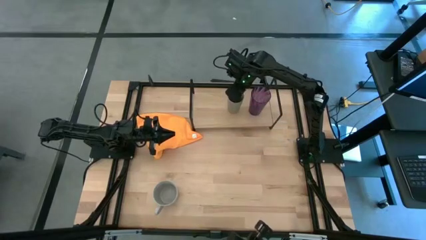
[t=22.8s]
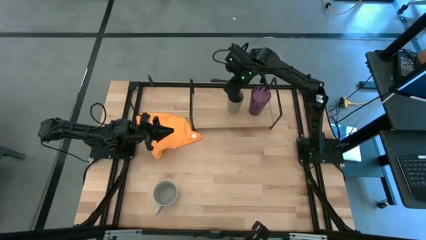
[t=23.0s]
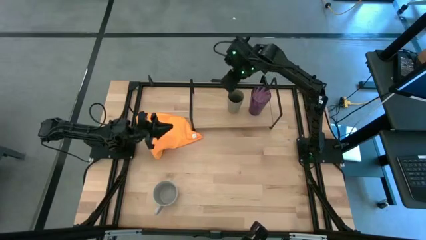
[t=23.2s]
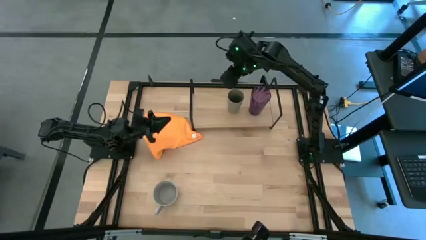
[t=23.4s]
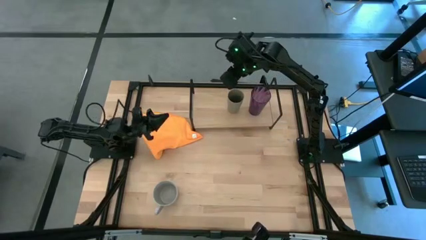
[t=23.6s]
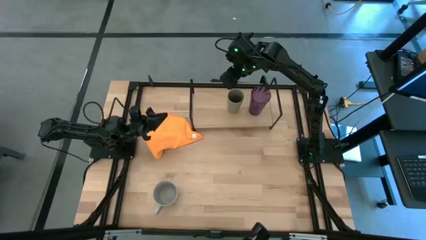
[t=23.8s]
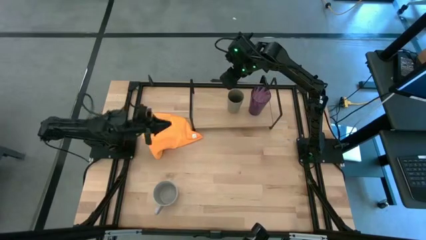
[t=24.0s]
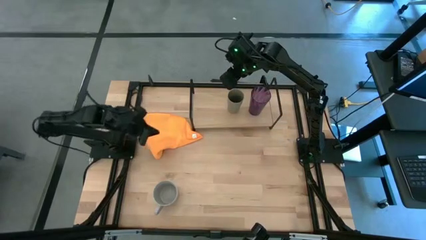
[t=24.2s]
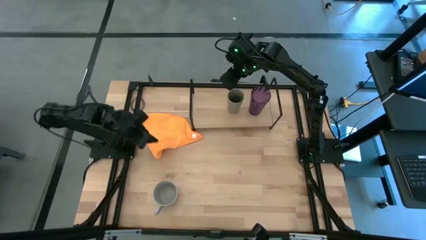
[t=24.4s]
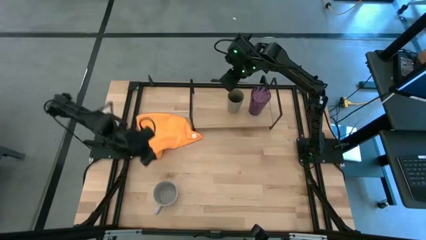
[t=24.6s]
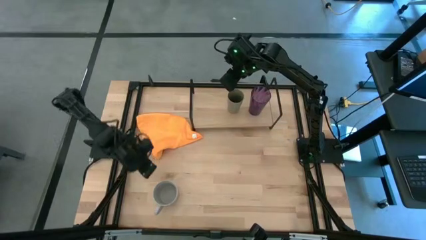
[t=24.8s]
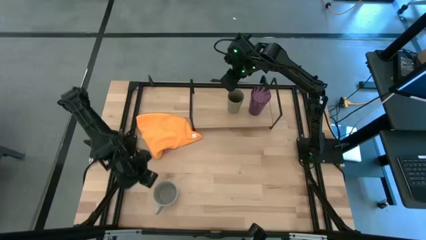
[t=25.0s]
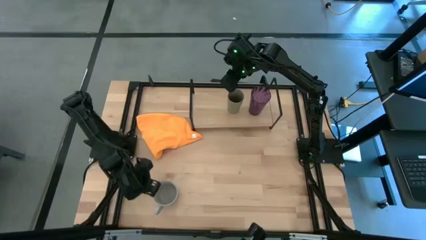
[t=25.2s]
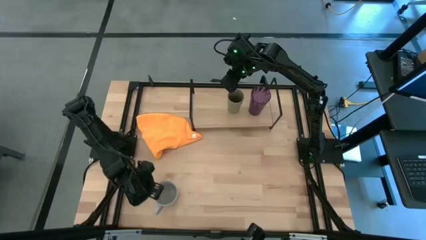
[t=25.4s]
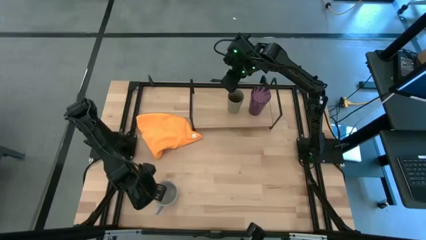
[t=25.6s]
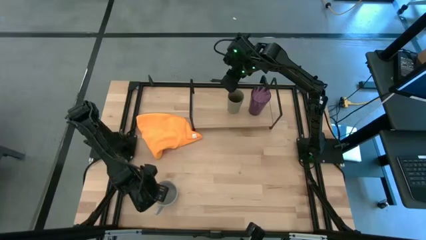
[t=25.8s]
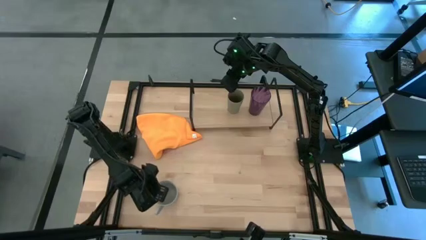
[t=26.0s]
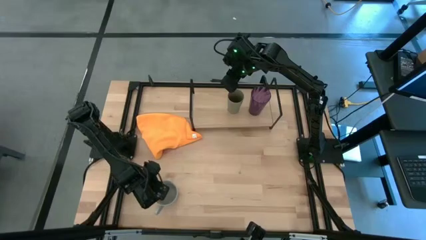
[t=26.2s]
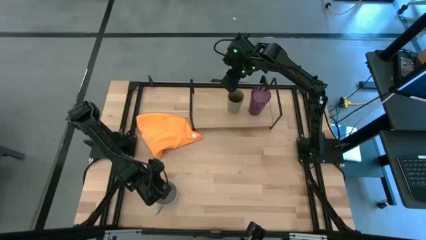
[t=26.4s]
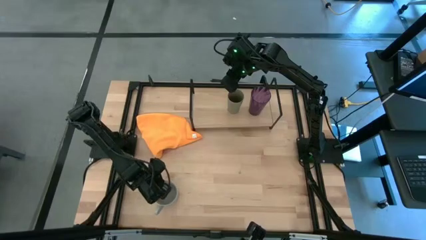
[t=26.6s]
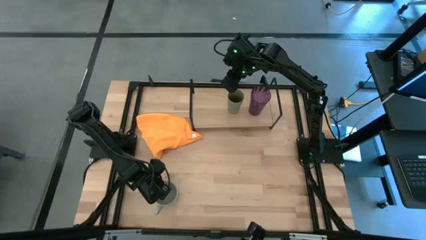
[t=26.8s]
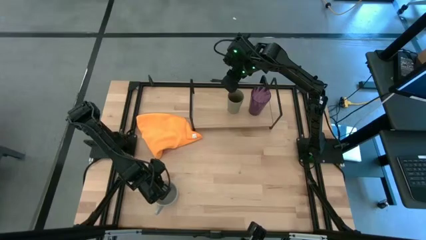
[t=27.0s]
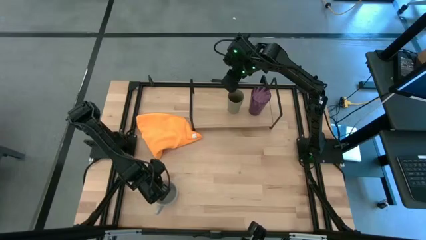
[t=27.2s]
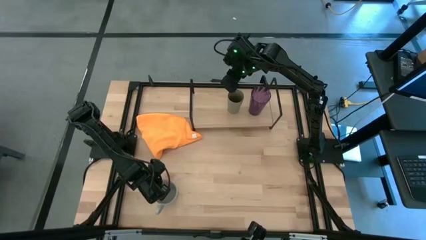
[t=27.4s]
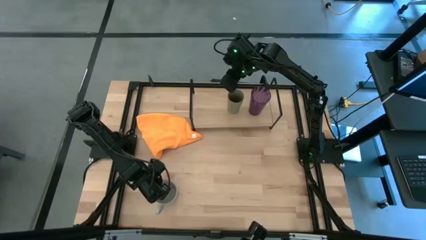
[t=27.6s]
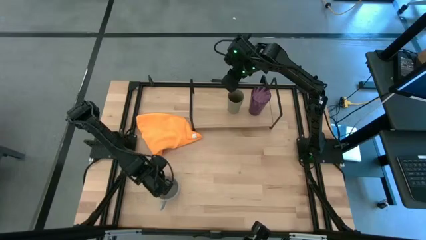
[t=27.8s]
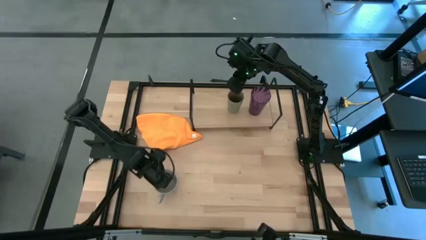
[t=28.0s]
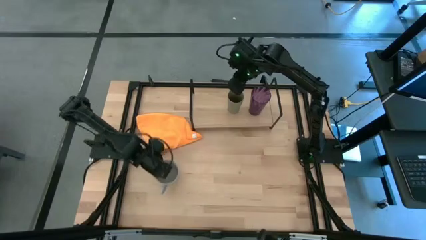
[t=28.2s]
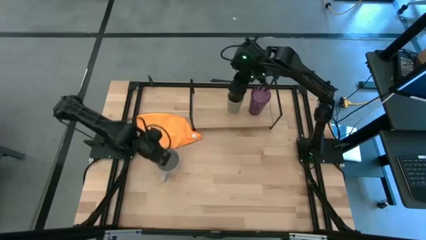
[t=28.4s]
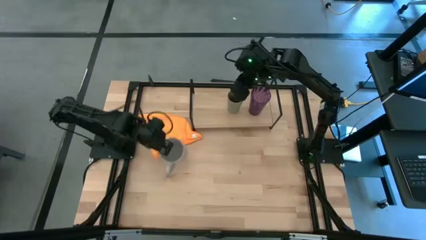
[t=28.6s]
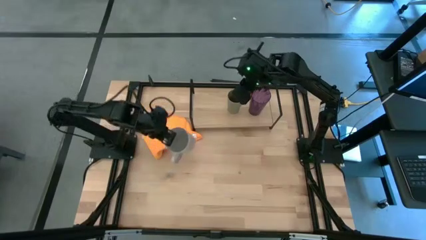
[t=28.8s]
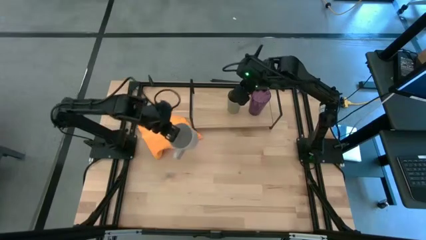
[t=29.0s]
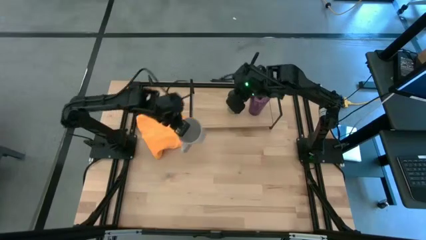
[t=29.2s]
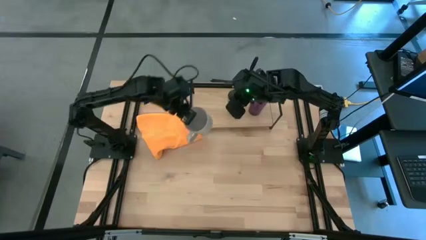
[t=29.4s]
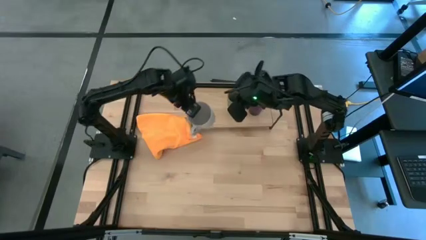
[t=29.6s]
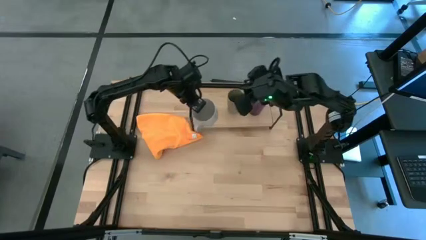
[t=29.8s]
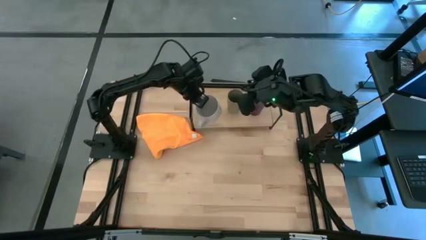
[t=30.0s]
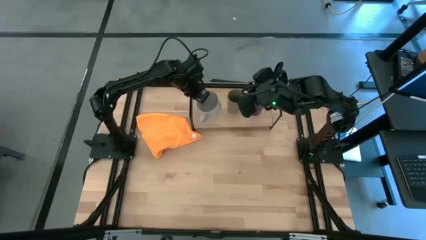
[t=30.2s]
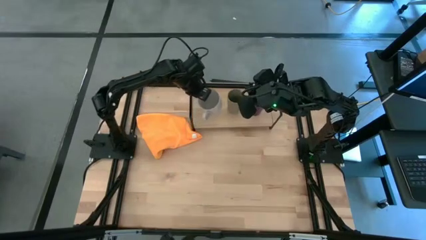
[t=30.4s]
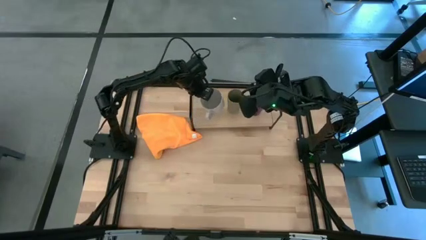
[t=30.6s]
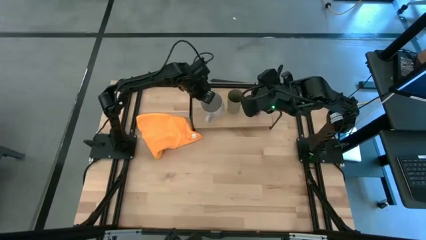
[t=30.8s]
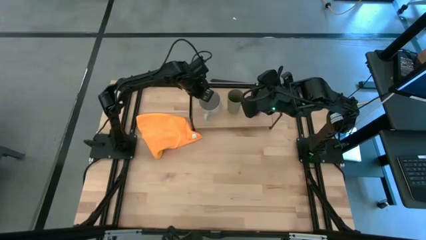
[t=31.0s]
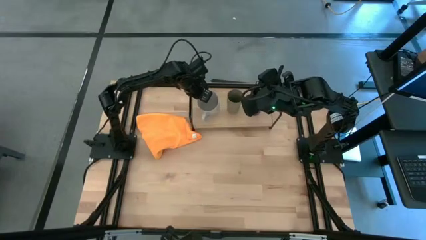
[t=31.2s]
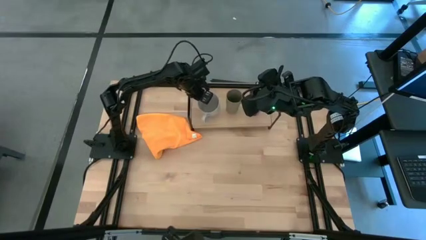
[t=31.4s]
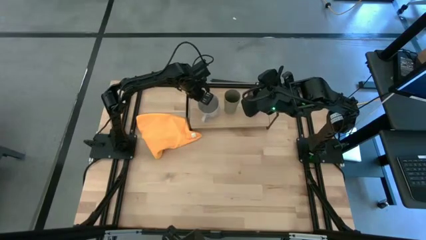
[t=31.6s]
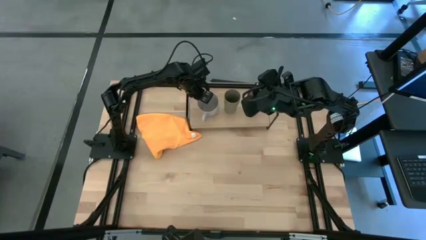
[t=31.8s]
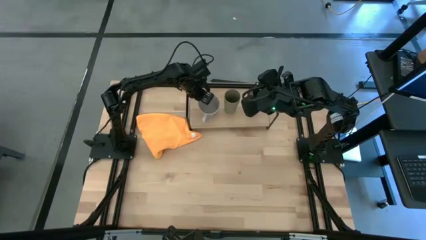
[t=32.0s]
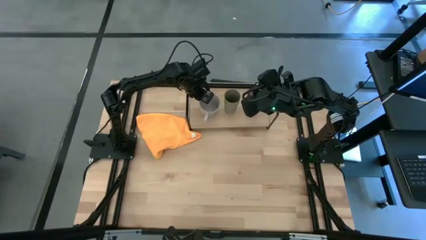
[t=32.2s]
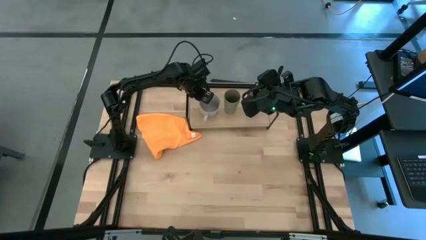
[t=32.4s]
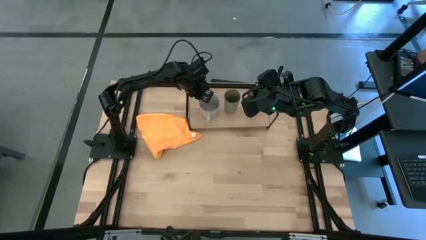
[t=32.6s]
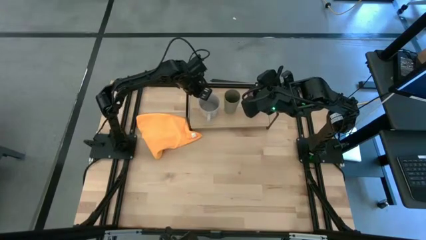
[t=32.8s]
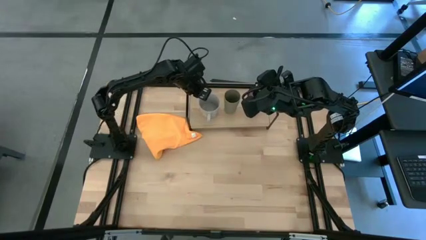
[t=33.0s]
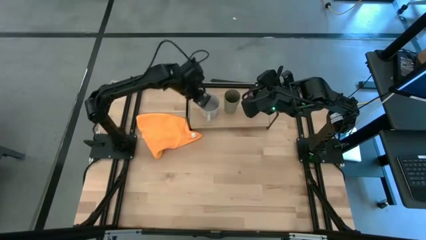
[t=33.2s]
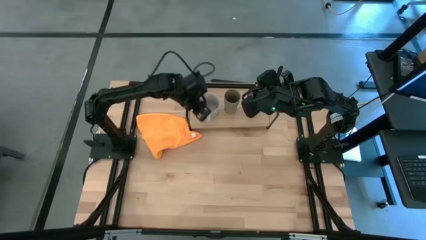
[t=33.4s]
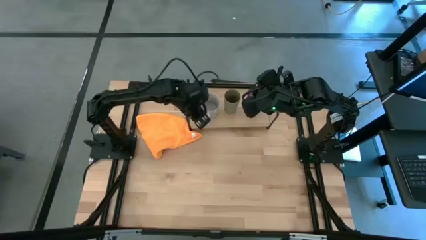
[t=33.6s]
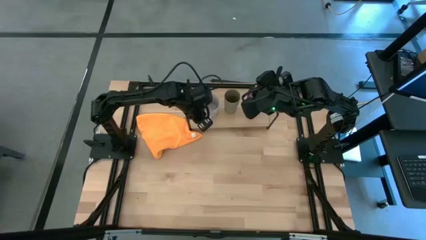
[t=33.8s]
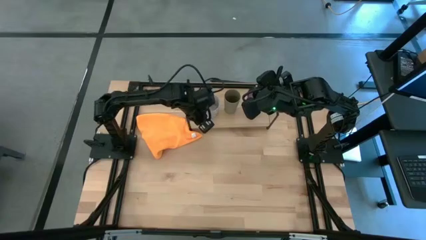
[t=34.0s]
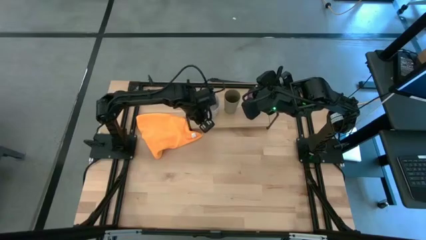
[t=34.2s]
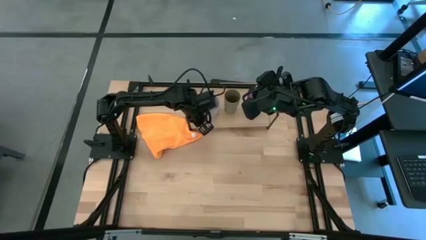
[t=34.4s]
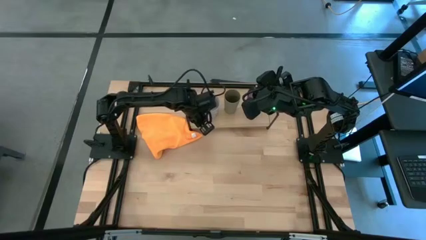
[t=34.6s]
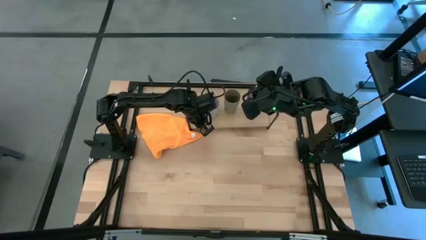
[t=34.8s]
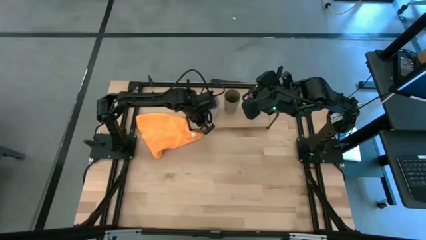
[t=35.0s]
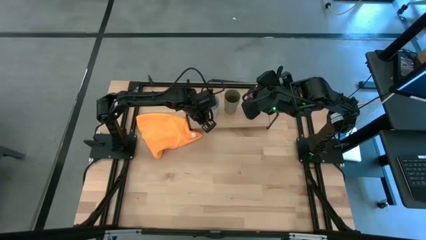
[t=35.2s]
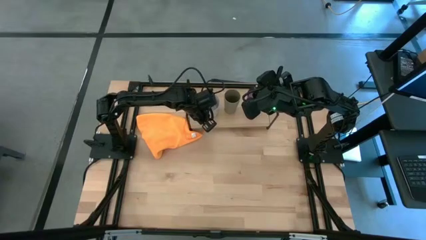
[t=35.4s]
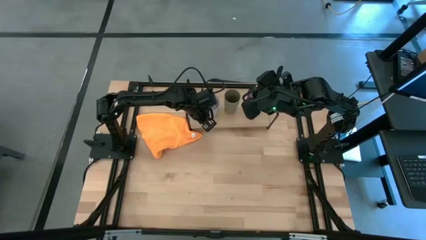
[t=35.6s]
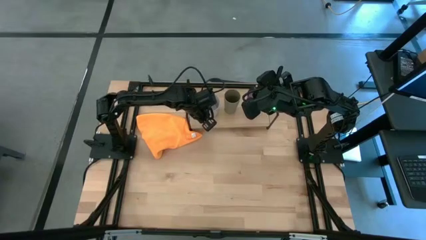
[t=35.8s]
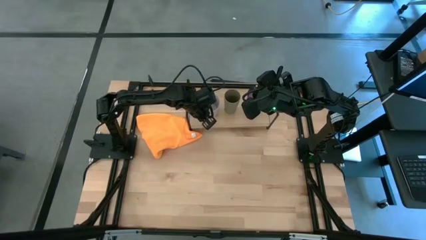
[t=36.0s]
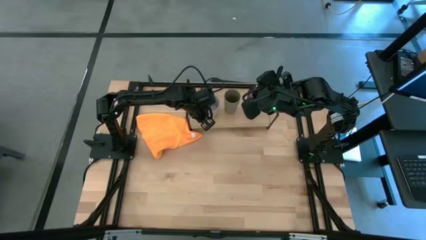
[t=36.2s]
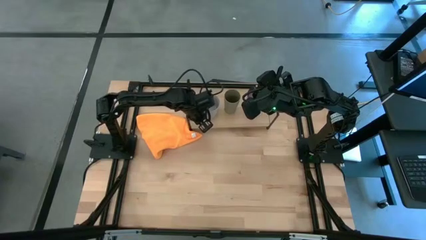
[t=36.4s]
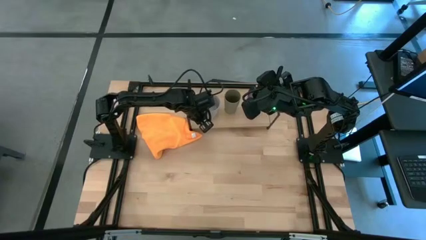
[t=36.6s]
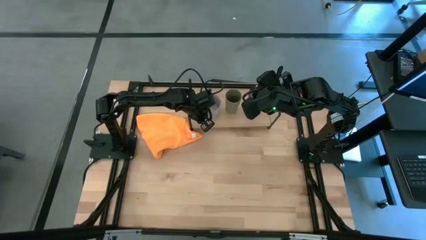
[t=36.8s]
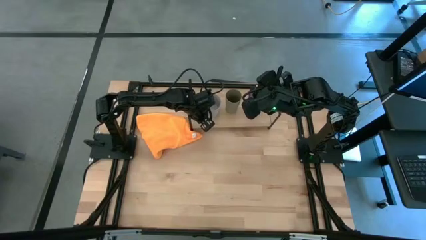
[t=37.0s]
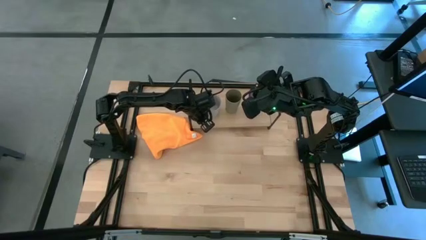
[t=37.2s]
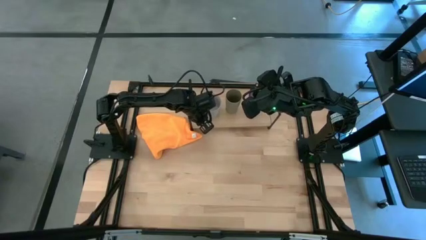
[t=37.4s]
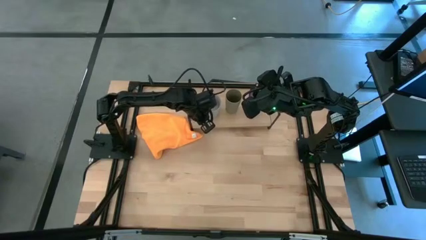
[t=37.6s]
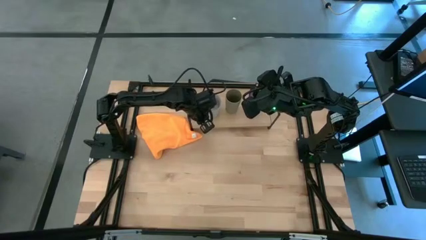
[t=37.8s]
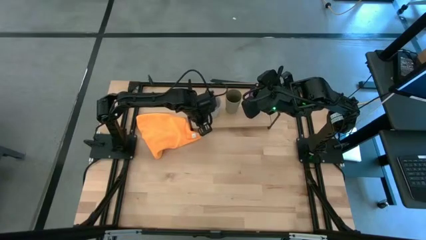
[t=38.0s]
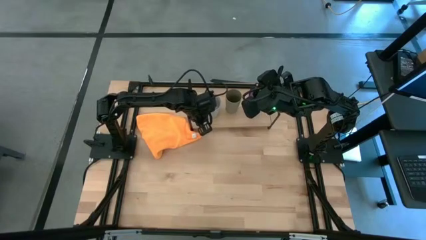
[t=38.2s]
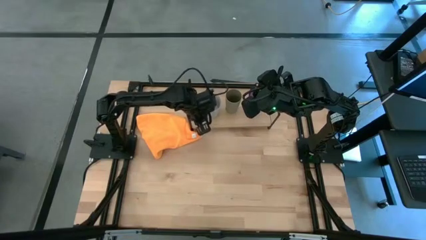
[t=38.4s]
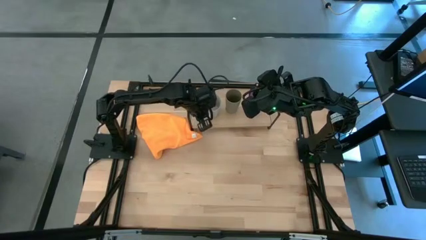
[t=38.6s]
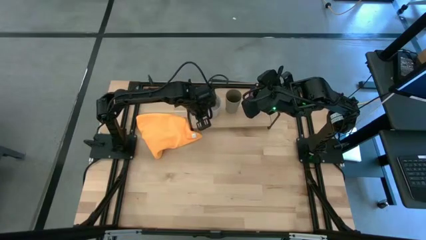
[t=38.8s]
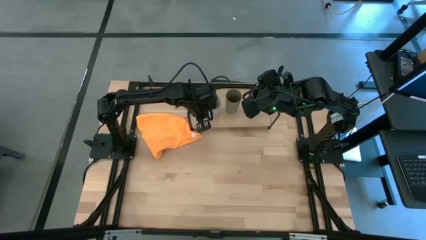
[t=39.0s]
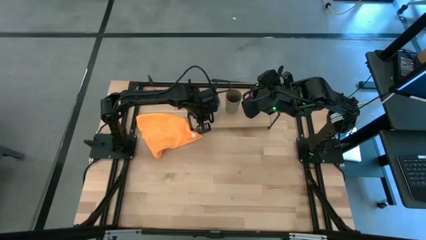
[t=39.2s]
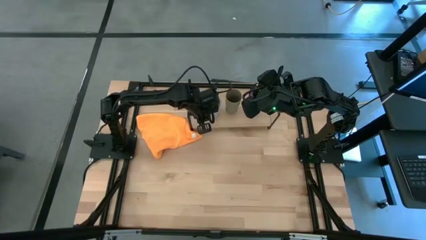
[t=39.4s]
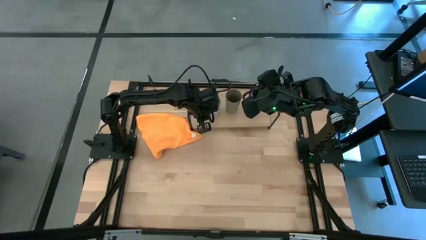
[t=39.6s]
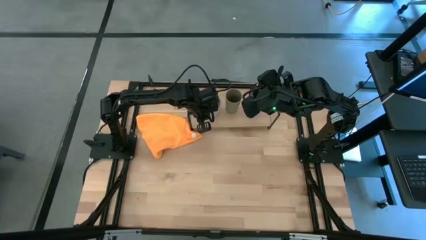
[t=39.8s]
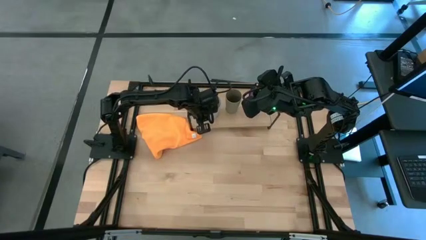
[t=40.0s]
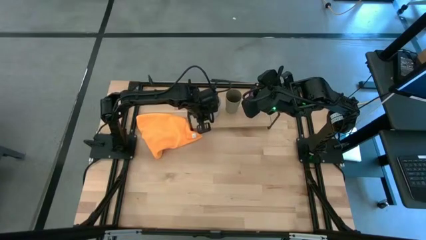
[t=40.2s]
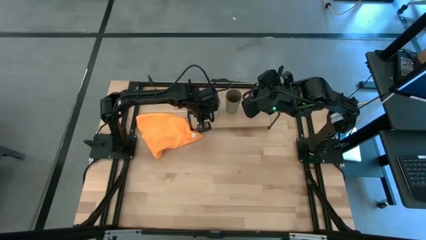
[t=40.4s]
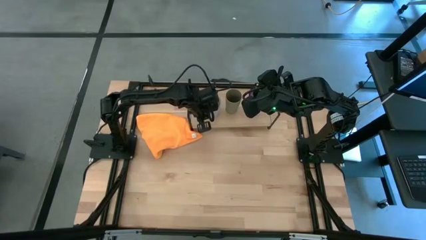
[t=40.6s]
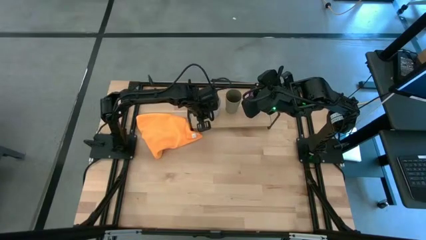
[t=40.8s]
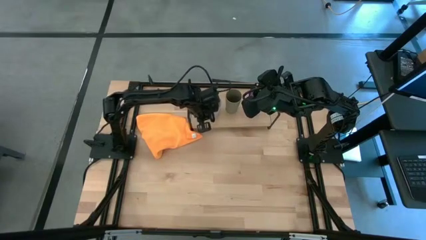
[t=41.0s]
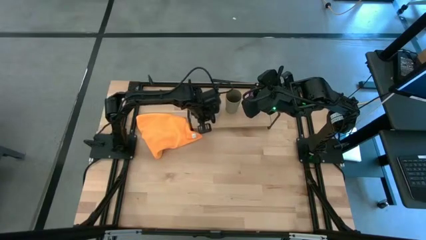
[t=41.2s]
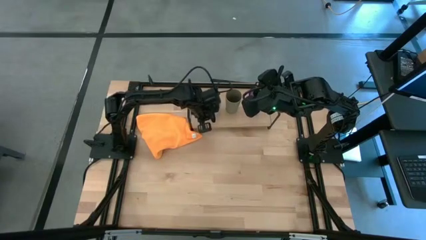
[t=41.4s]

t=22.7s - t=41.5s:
Task: Stack small to large cups/mugs on shelf
Put the white mug on the shelf
